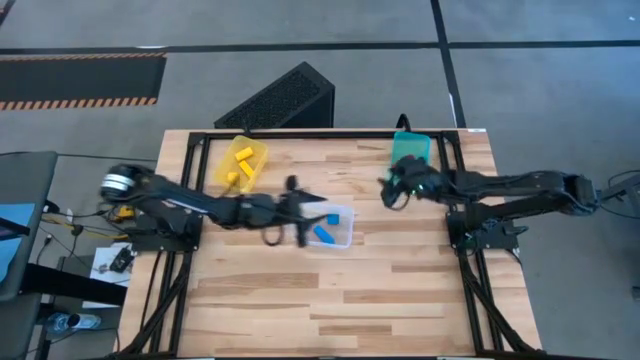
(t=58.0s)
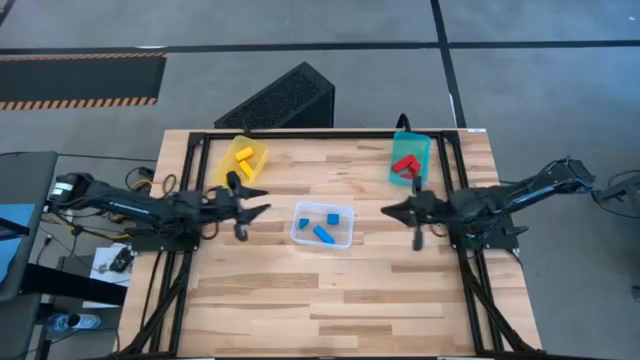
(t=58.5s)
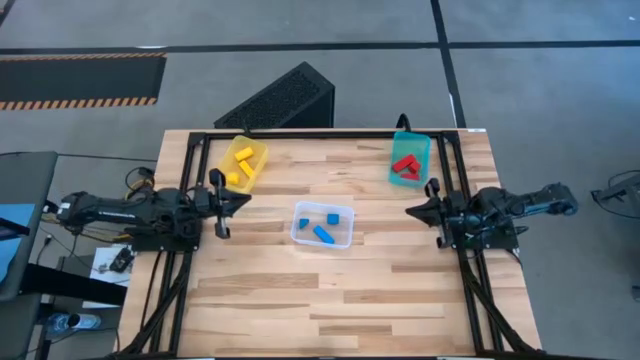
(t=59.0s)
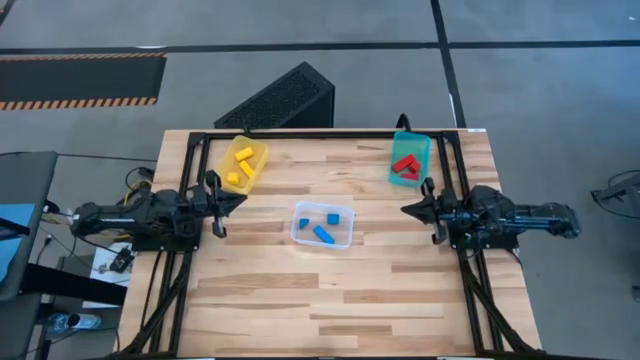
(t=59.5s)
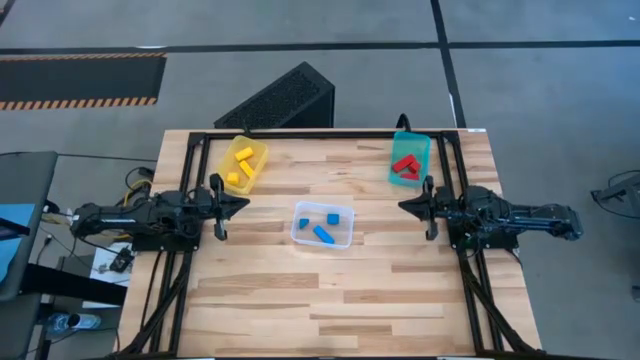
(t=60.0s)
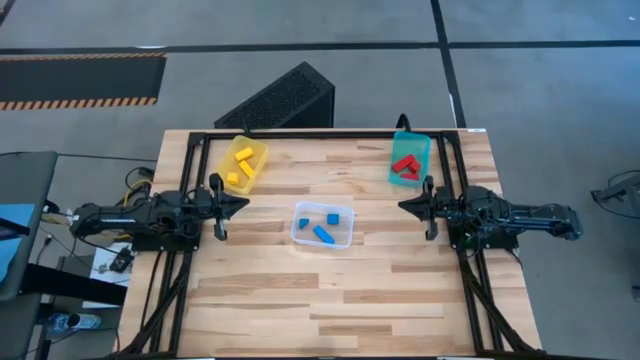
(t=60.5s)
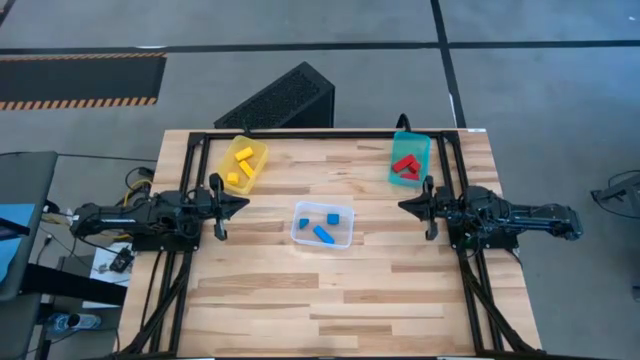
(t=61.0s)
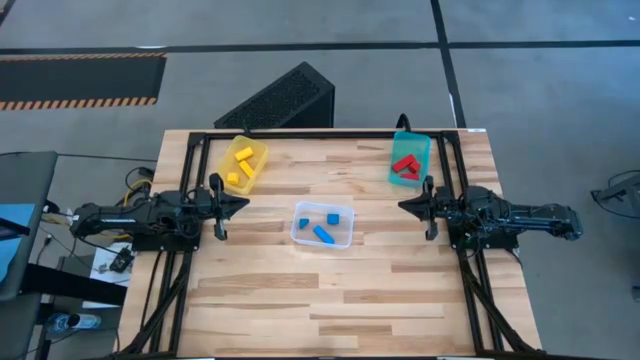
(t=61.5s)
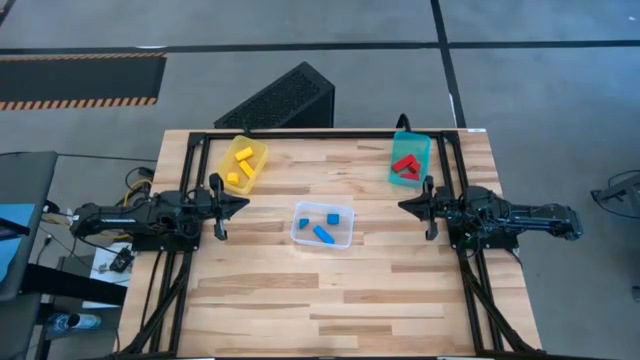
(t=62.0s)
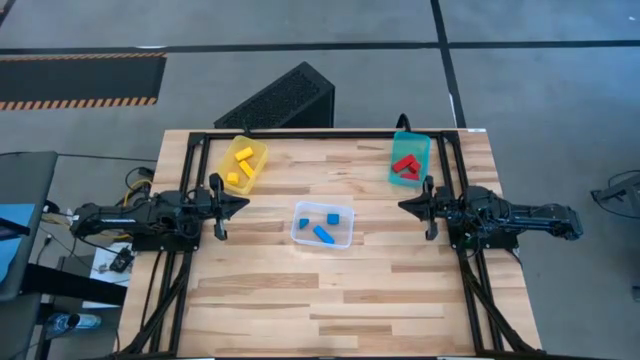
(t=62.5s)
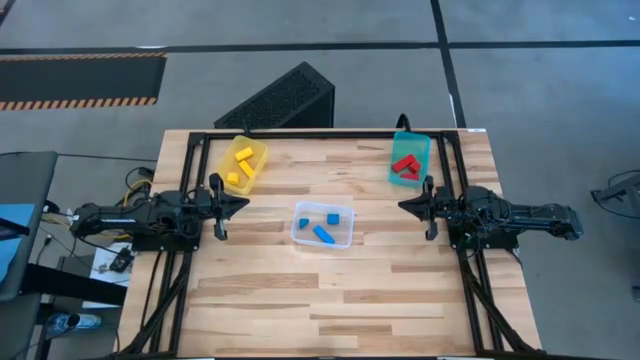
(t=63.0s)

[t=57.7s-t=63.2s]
Task: Sort & place blocks by color
Return to Home Position

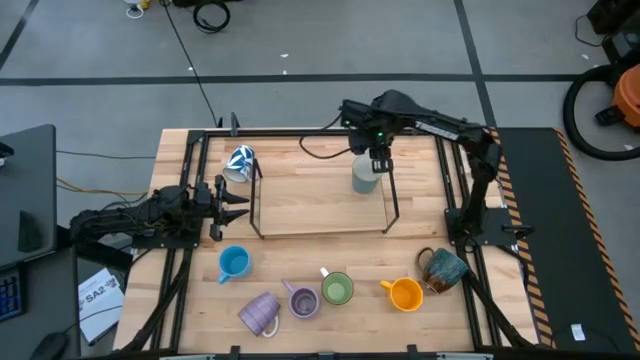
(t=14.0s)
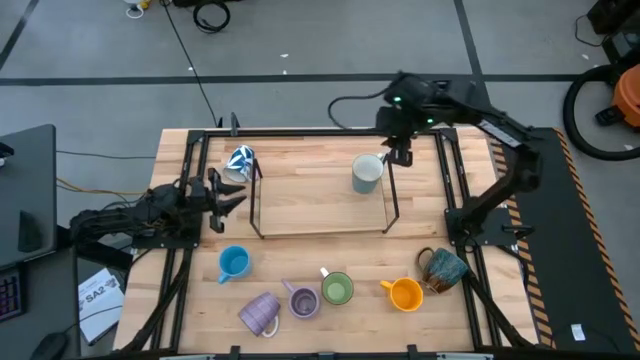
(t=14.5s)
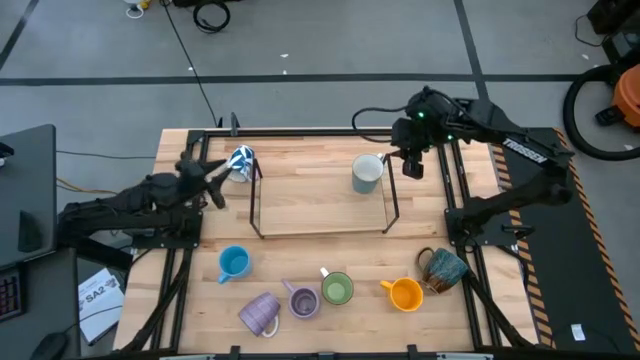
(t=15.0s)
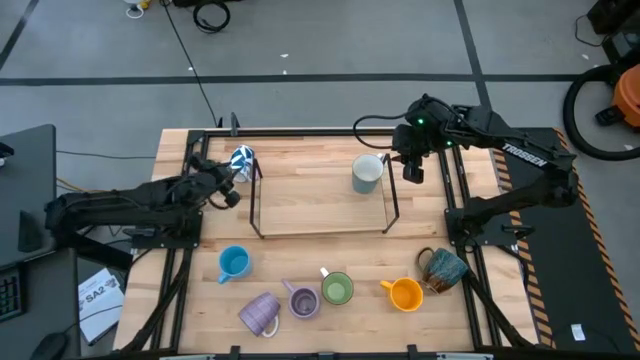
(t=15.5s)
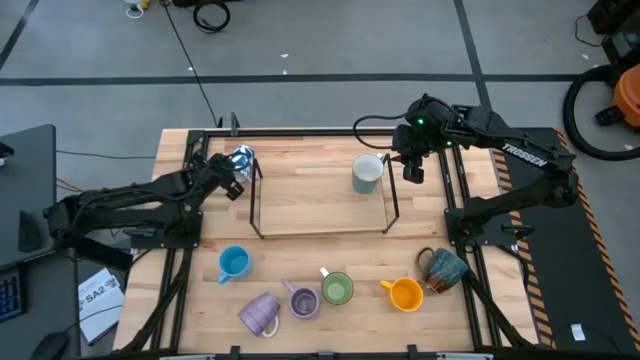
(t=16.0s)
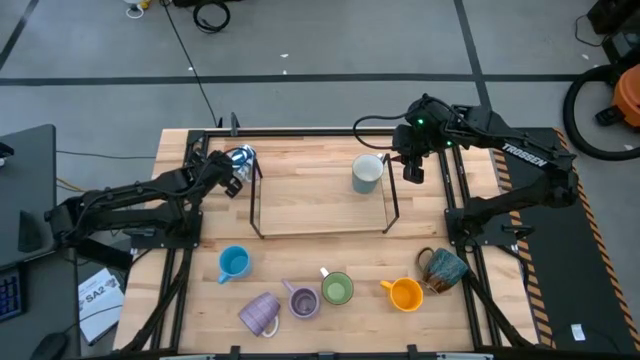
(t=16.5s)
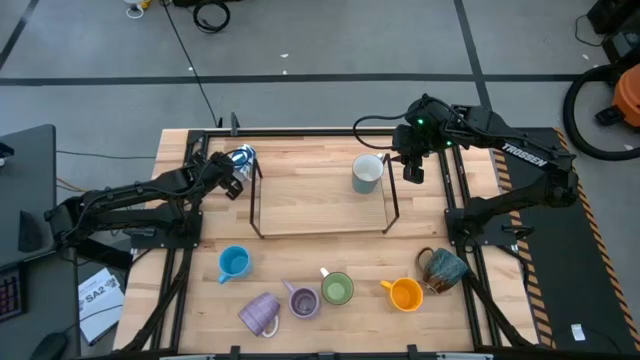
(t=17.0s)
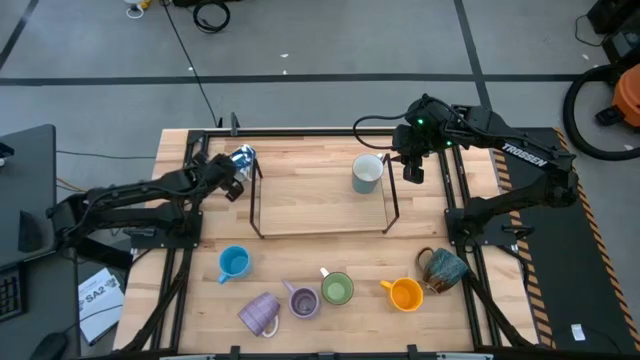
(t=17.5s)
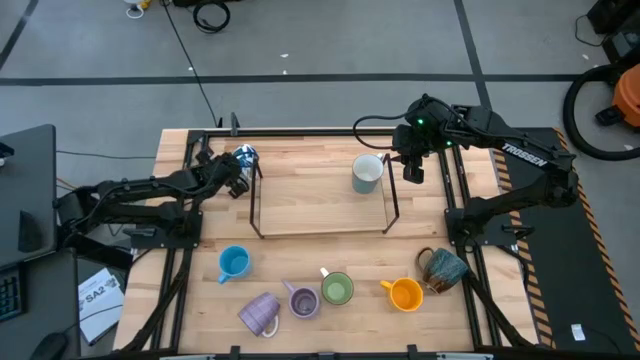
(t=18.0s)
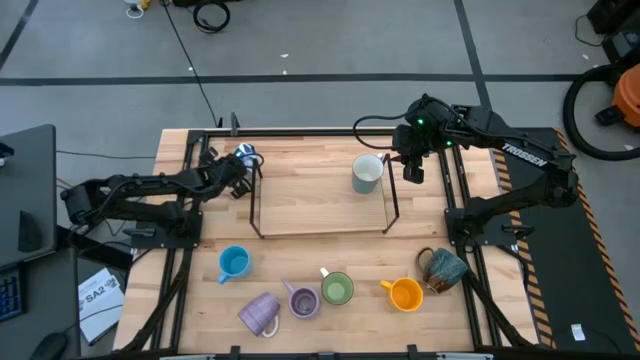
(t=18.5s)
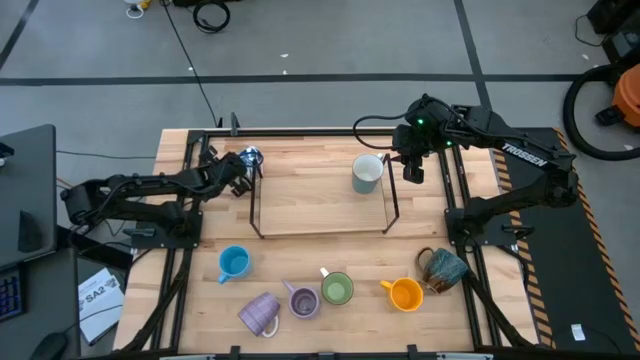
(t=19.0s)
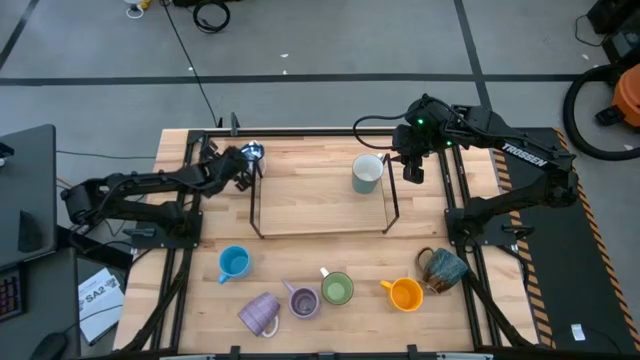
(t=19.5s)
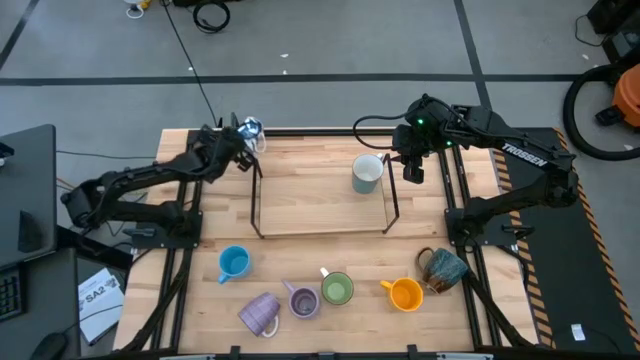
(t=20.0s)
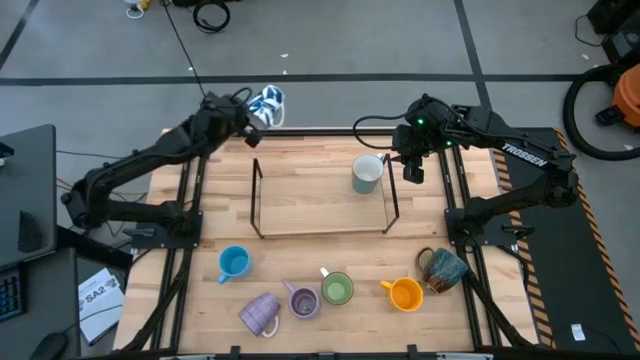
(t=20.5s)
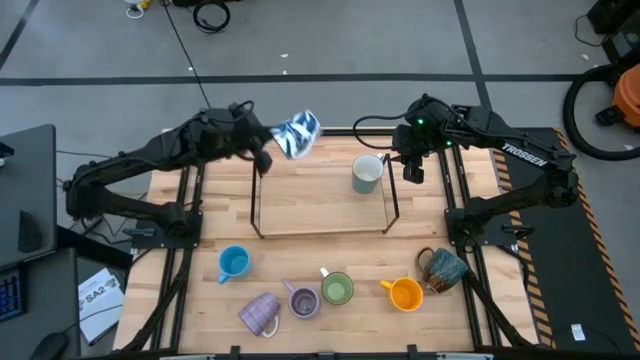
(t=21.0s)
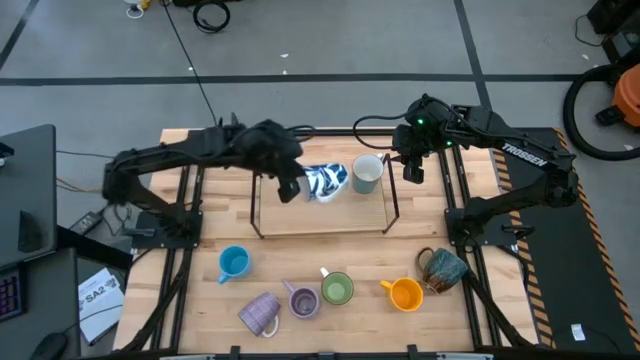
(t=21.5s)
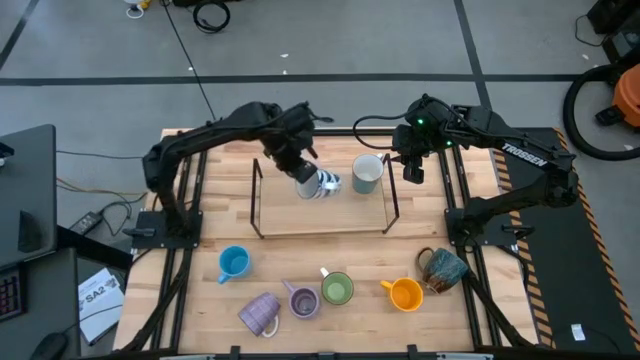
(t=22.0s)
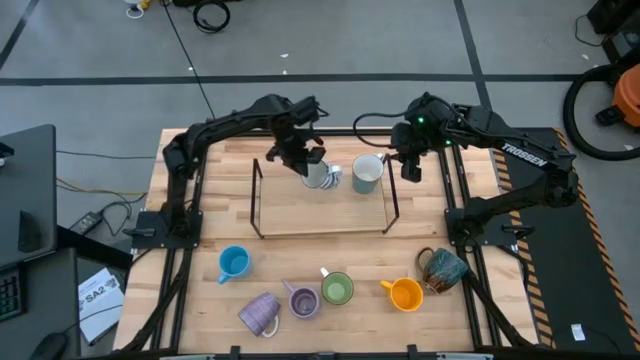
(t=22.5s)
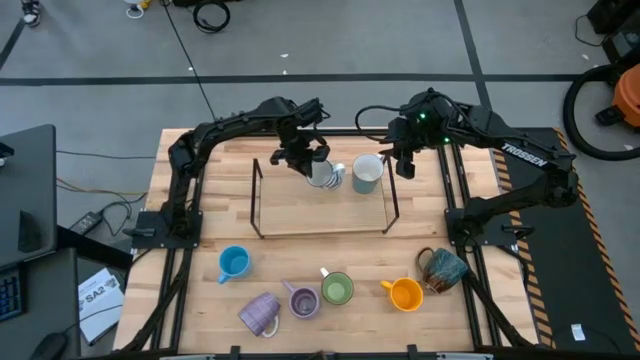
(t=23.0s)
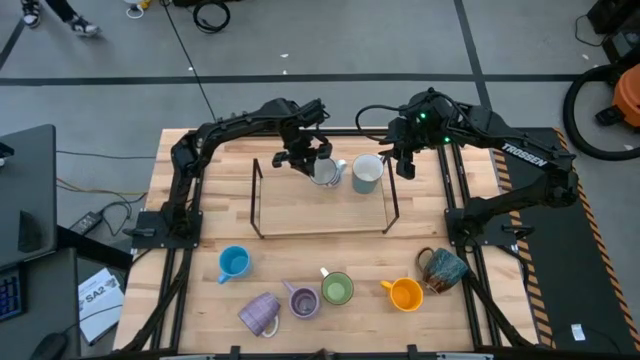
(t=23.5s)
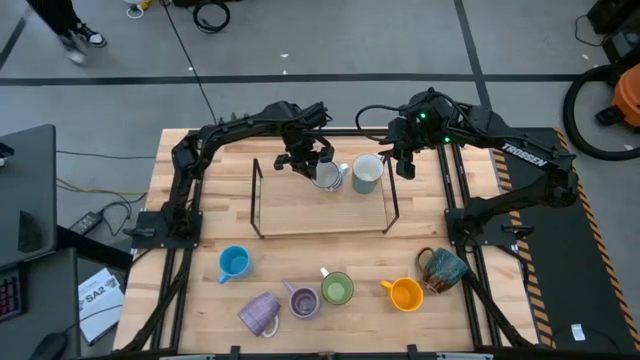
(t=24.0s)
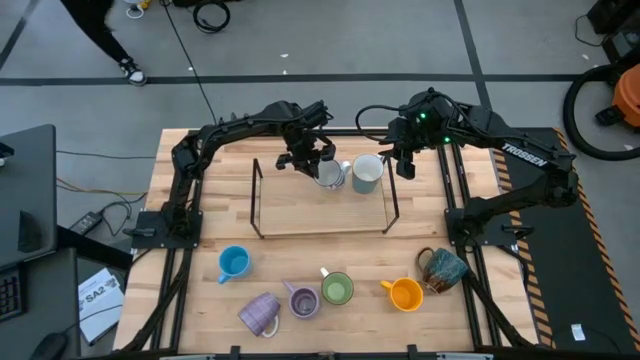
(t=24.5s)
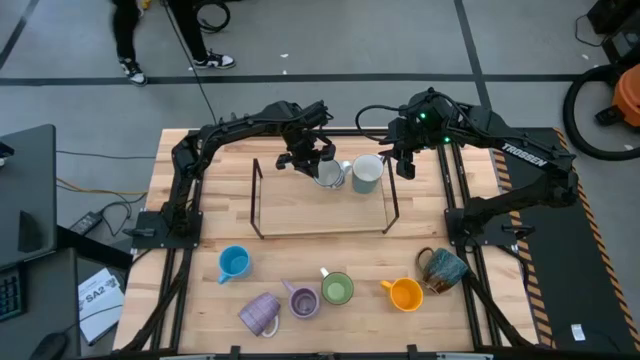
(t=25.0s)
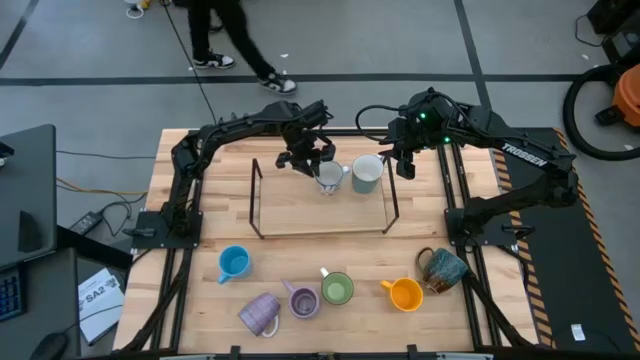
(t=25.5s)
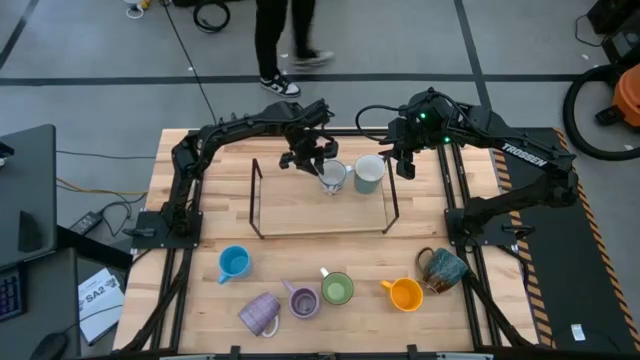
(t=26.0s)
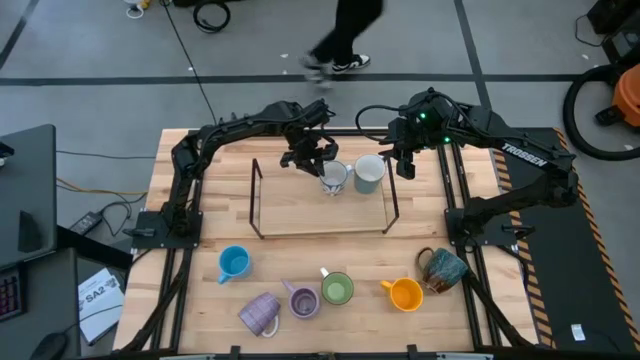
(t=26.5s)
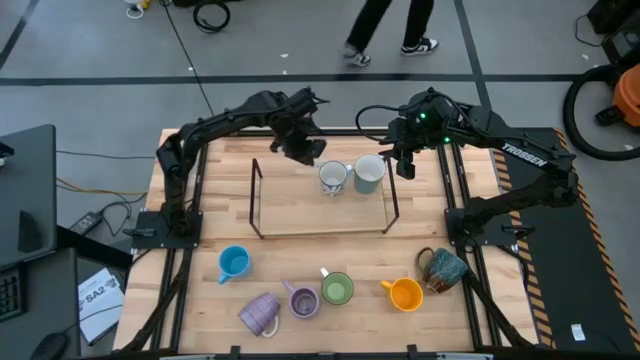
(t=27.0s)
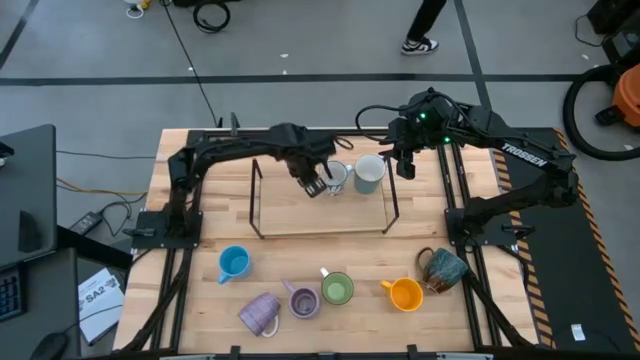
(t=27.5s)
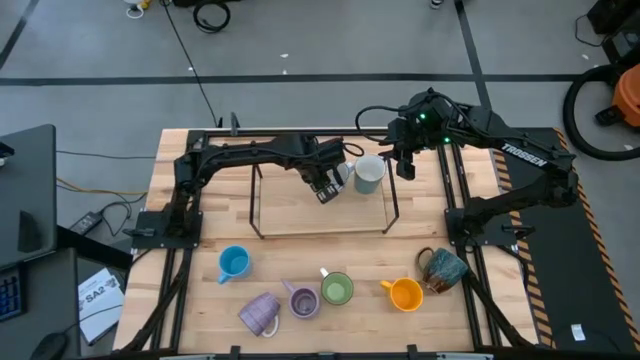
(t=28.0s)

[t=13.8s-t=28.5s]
Task: Place coffee mugs
Put the white mug on the shelf
